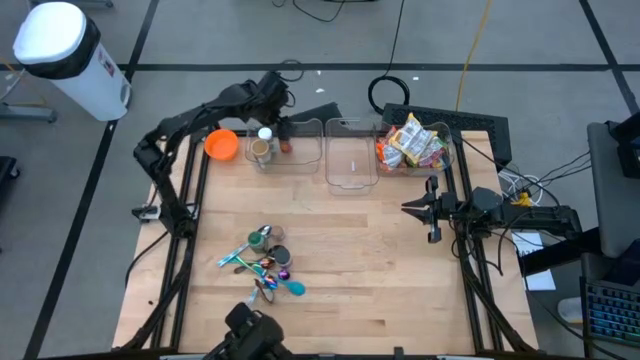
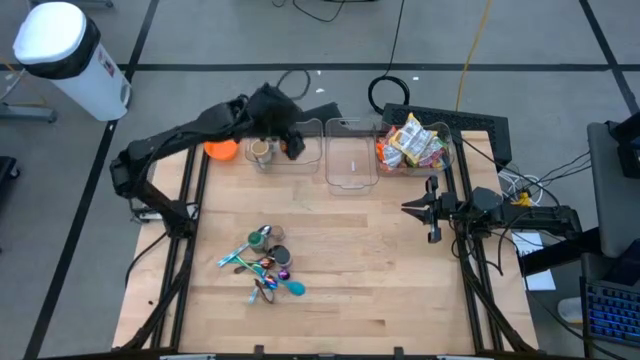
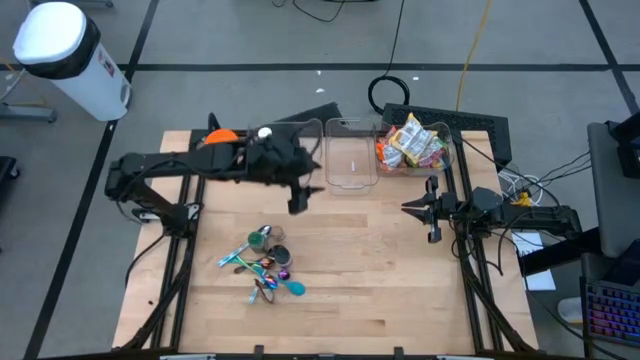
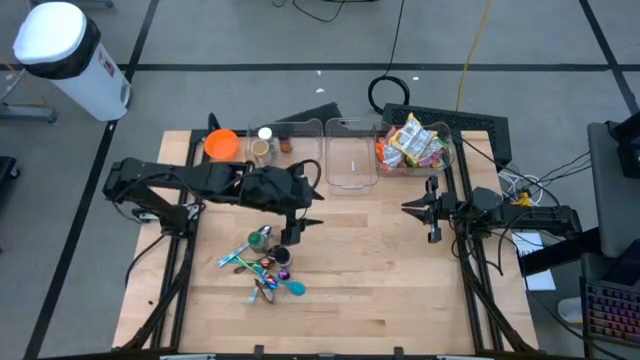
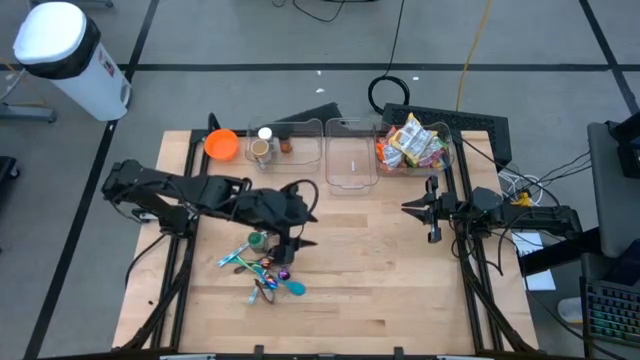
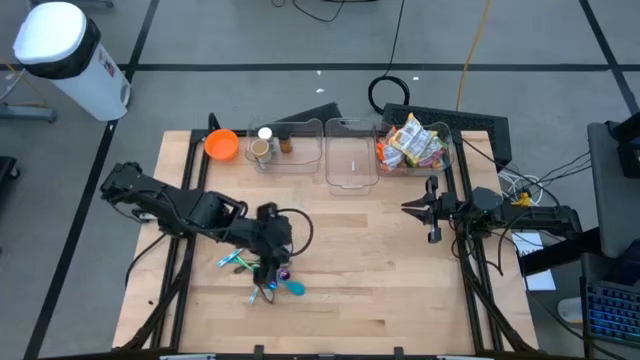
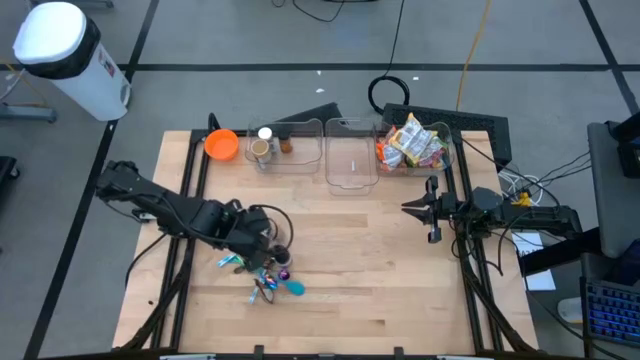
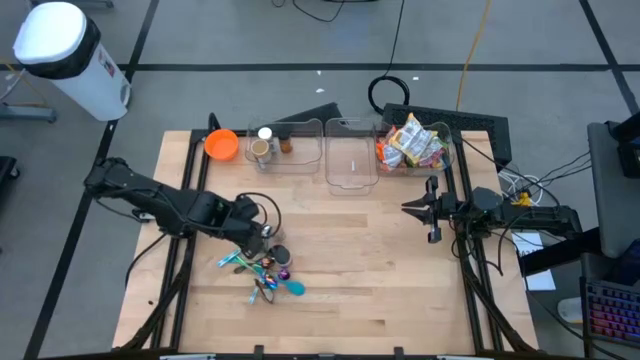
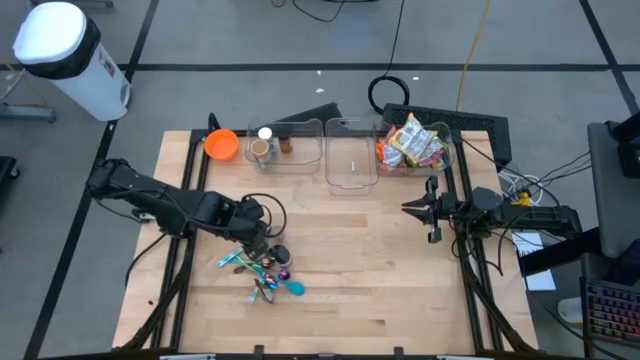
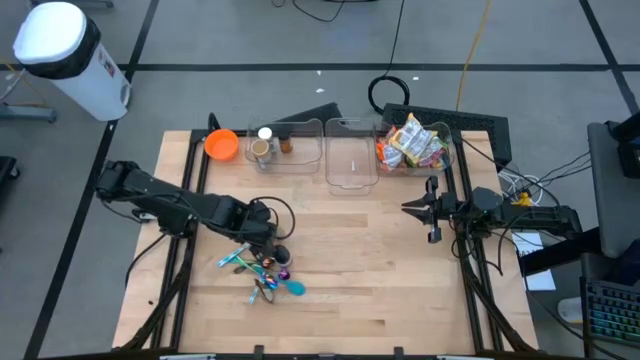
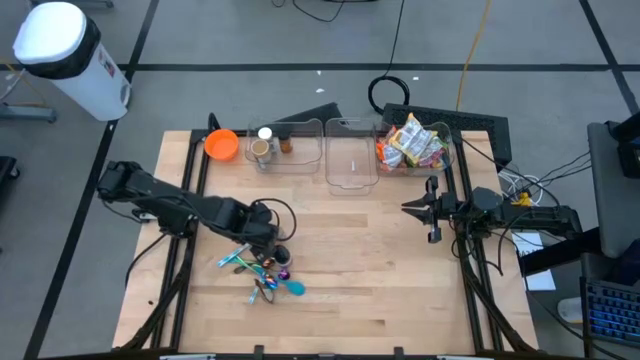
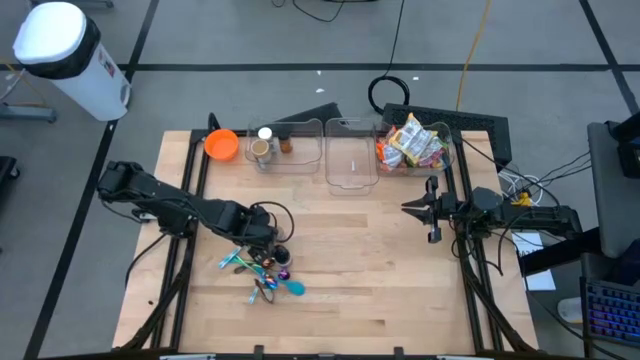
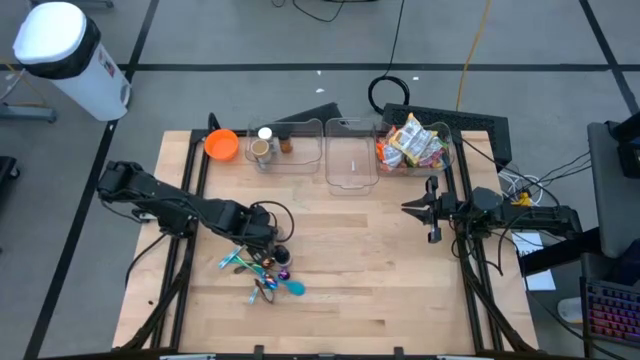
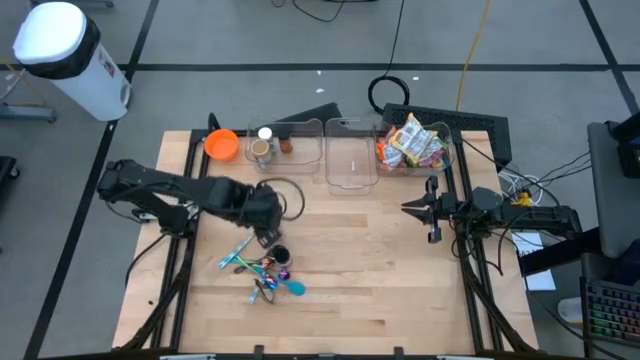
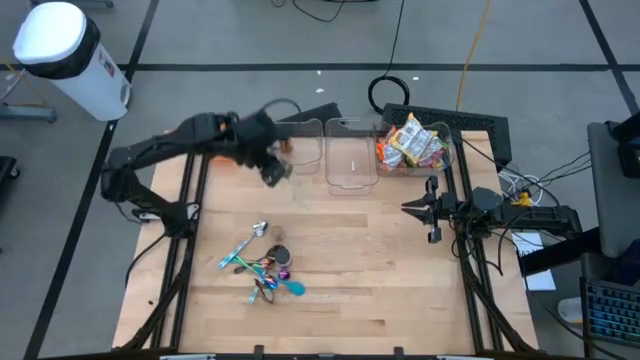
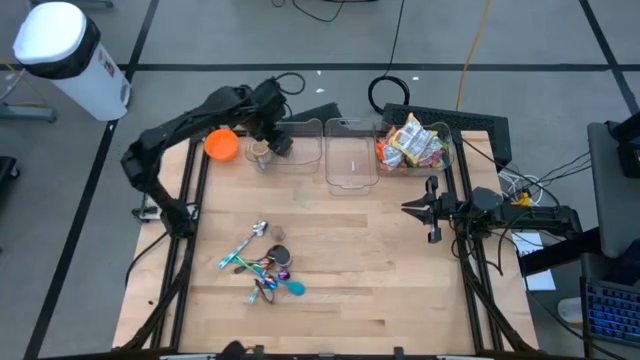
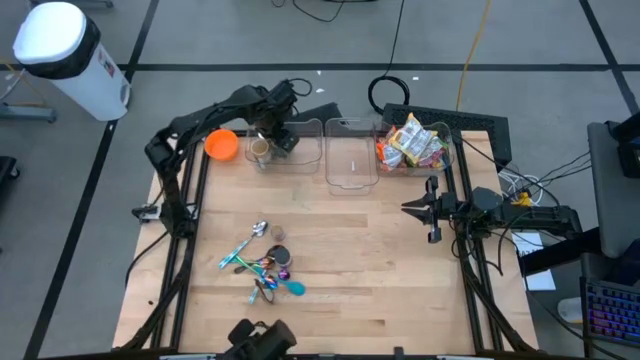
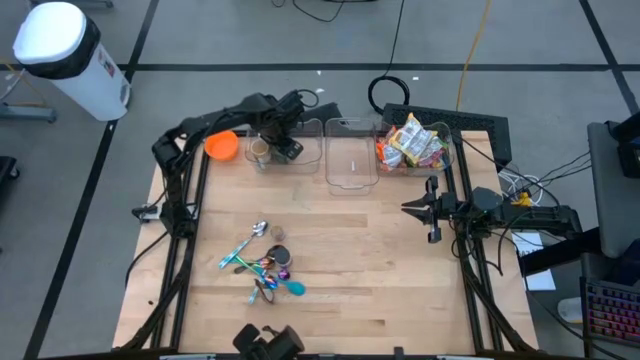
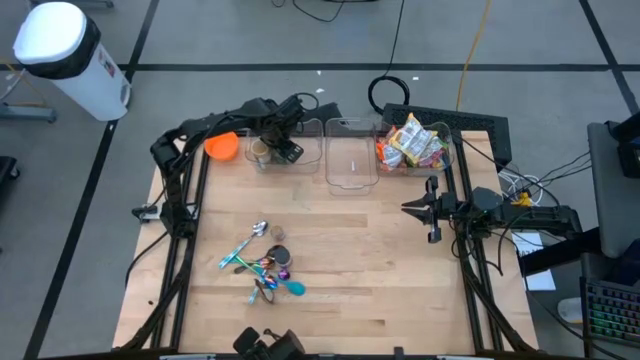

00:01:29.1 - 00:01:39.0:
Task: Pick & Place Food Item
Put the green seasoning bottle into the left transparent bin

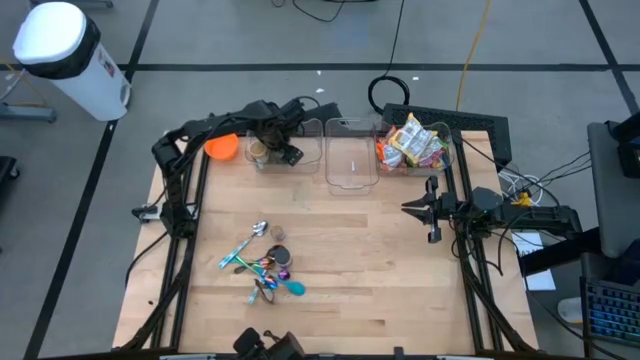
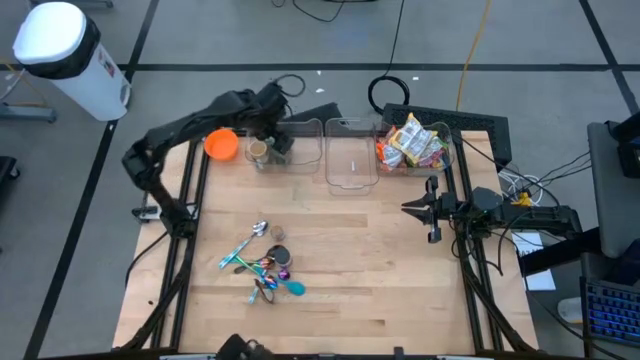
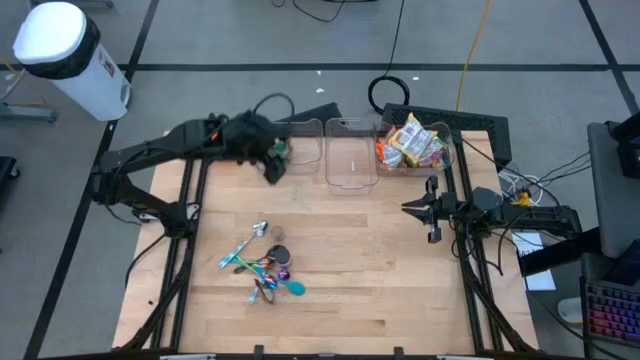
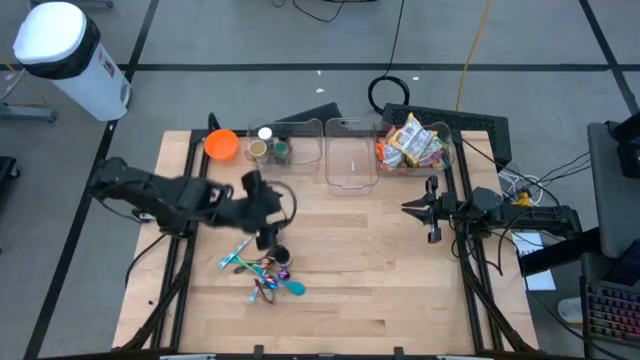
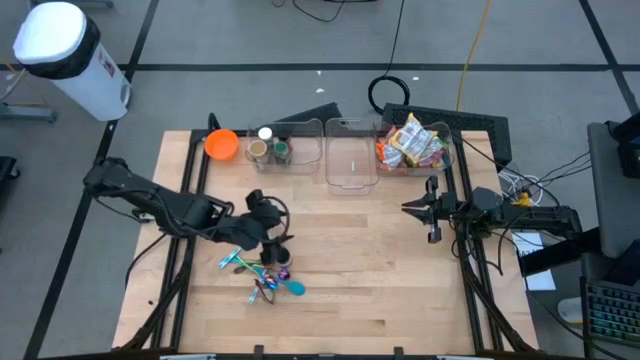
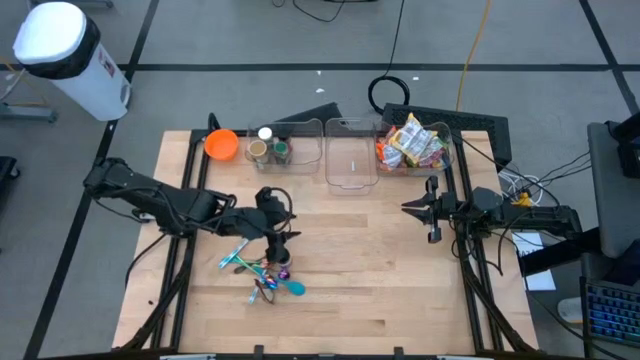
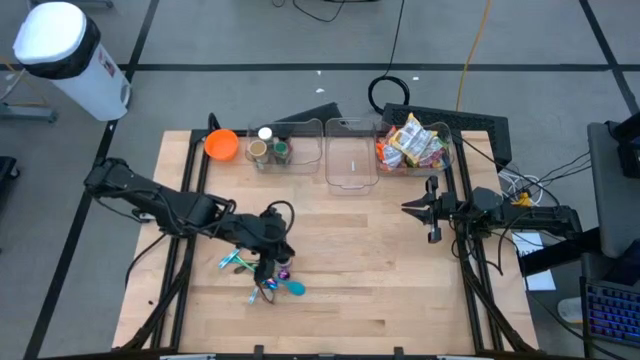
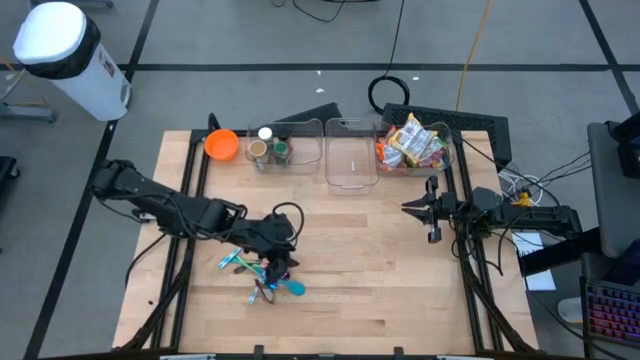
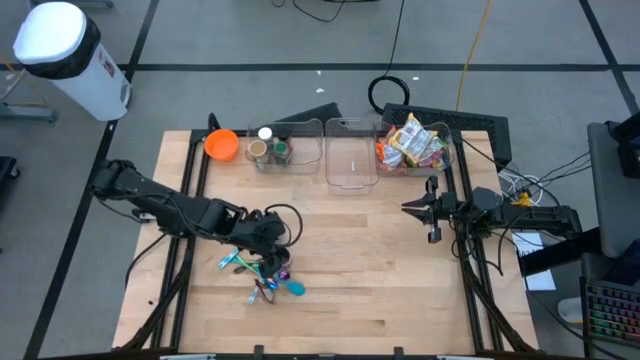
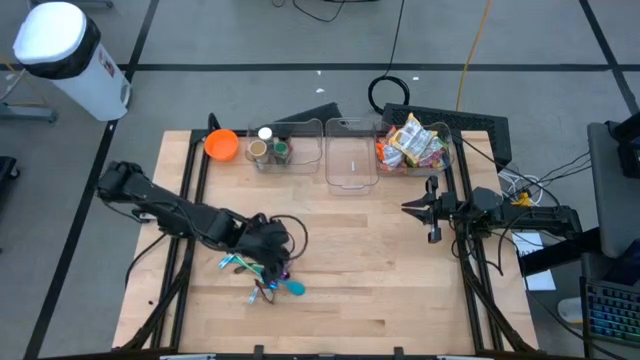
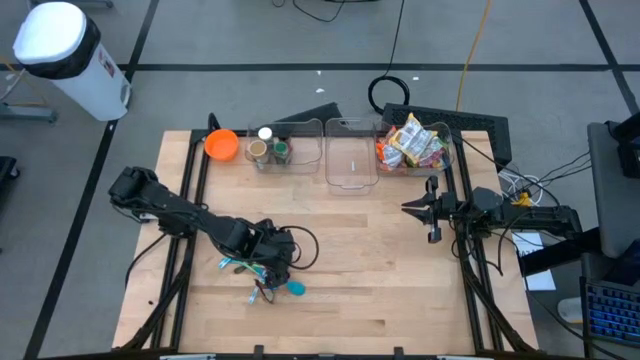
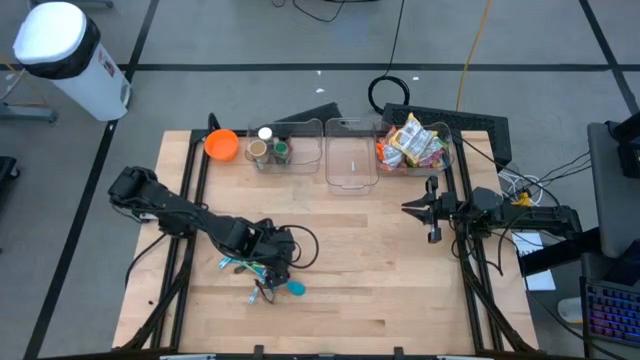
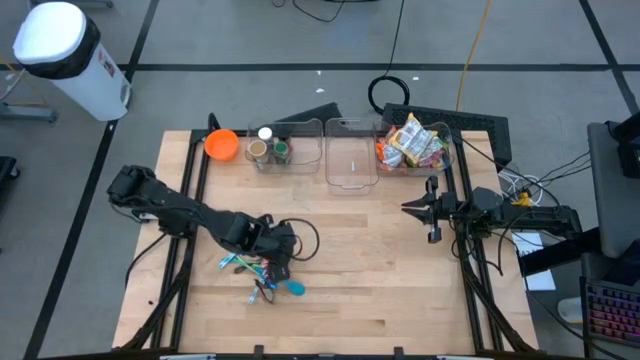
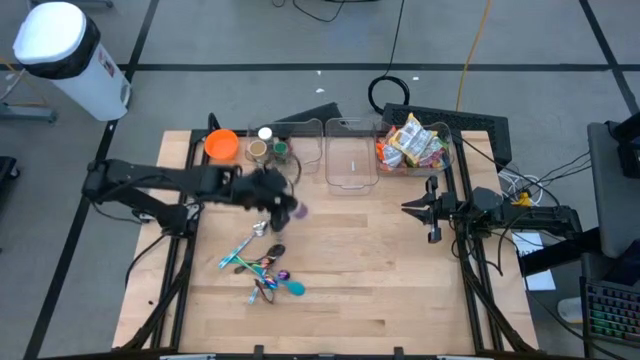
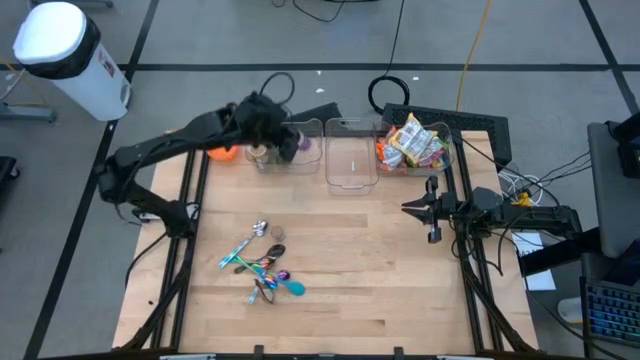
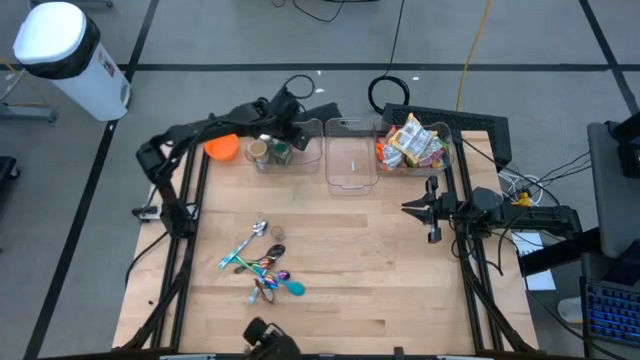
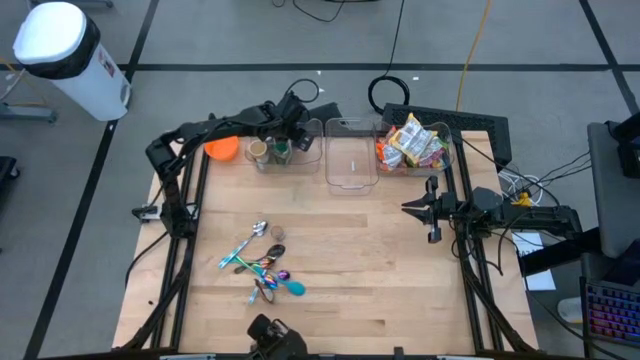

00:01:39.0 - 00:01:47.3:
Put the black seasoning bottle into the left transparent bin

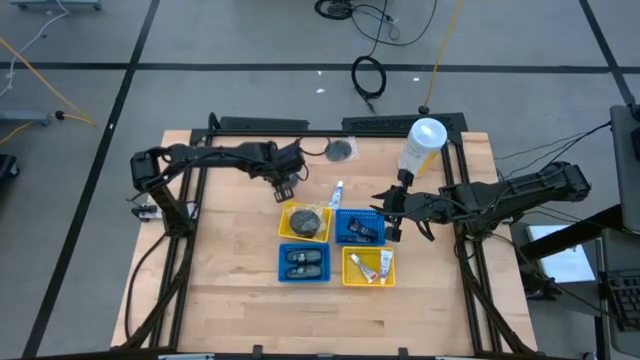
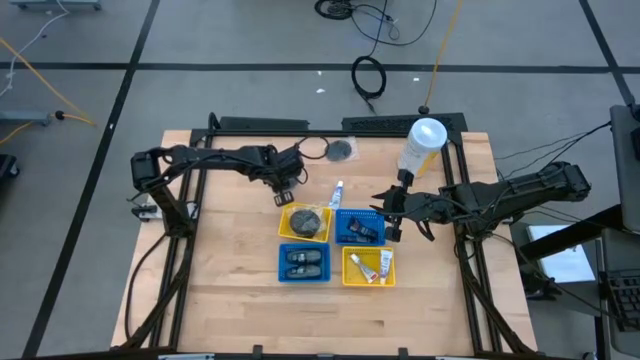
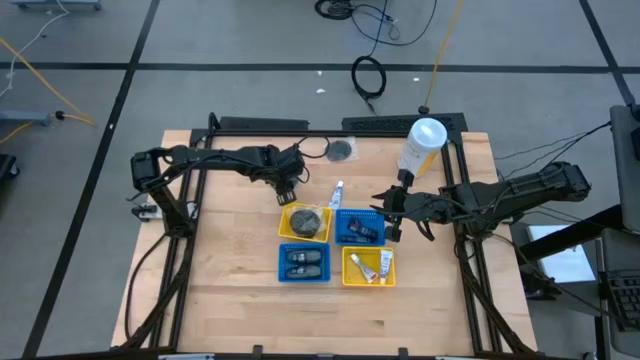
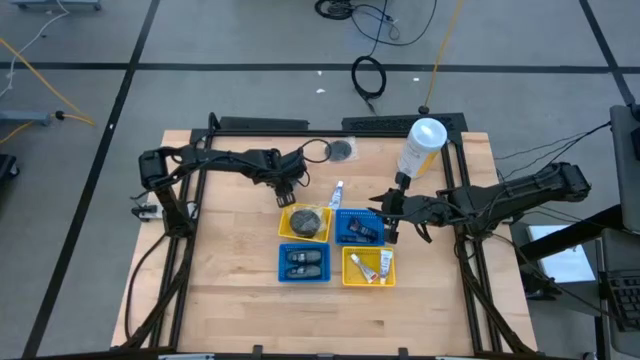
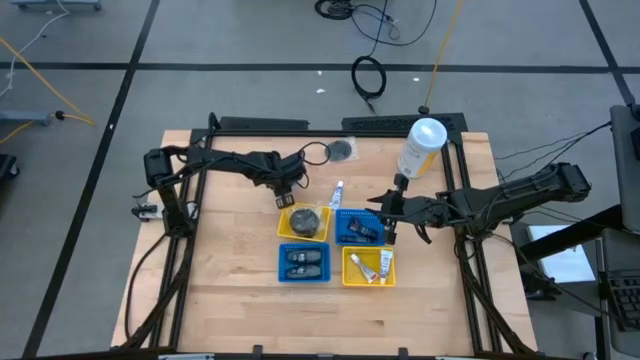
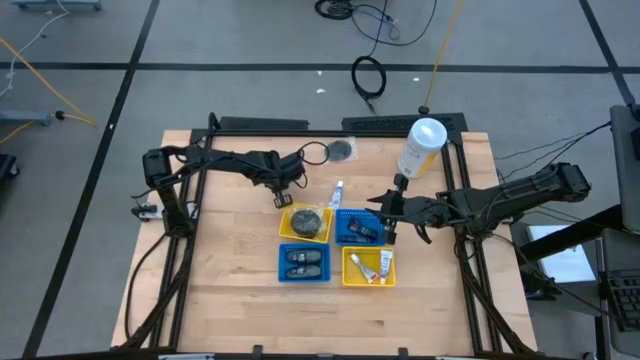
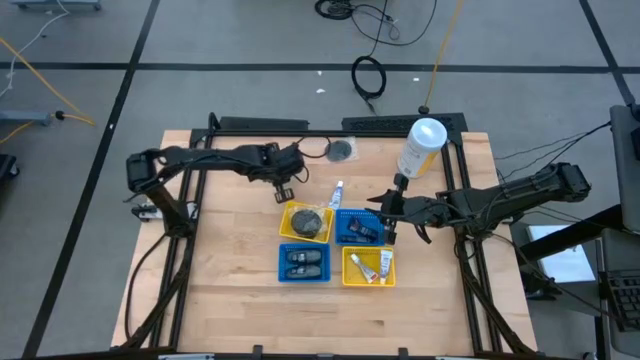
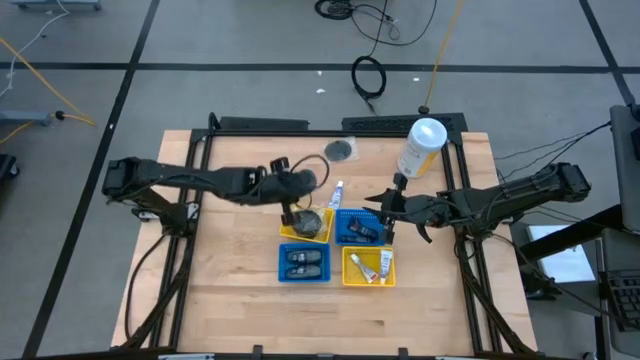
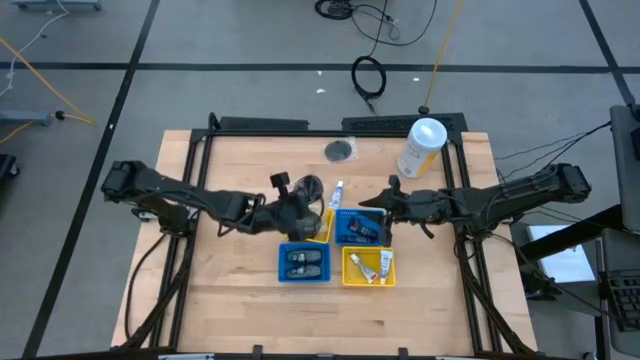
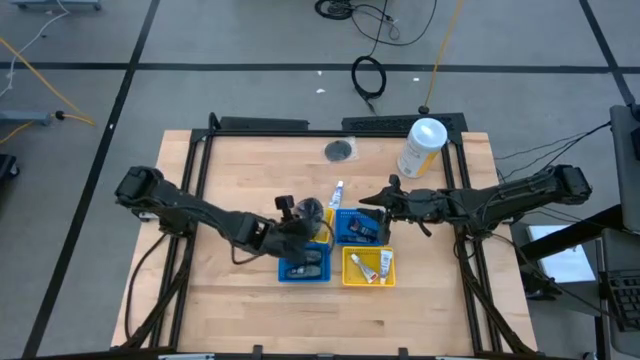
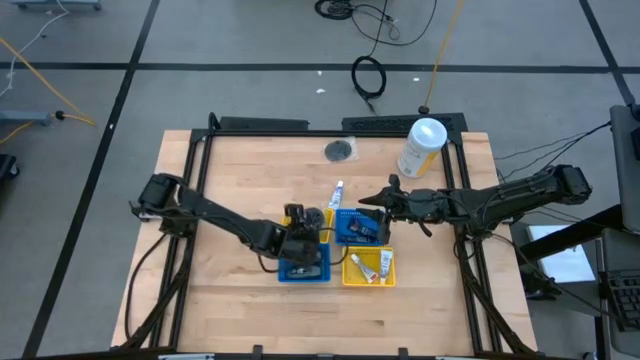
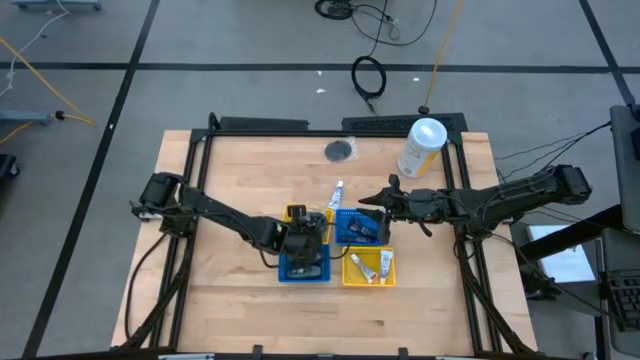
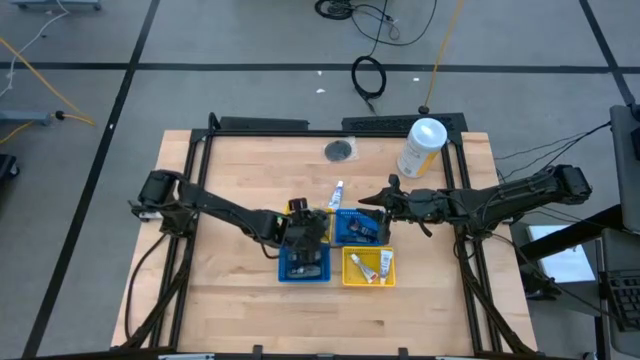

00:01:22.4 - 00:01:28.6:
Task: Pick & Place Travel size toiletries
Put the black hairbrush into the top yellow basket
